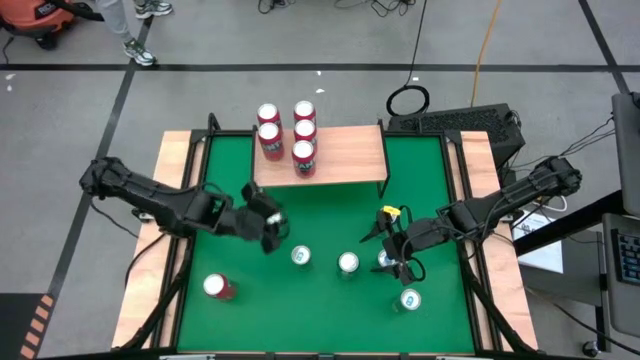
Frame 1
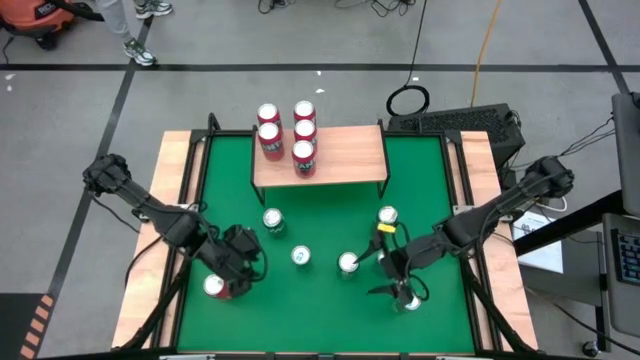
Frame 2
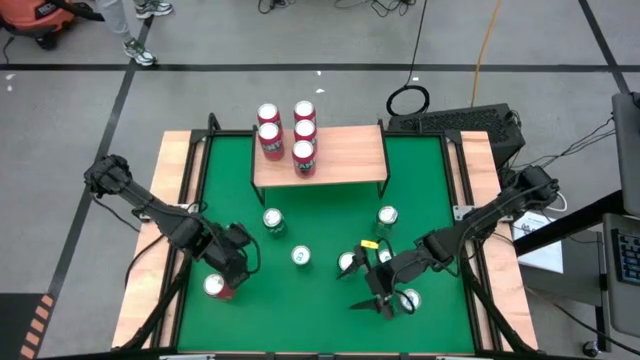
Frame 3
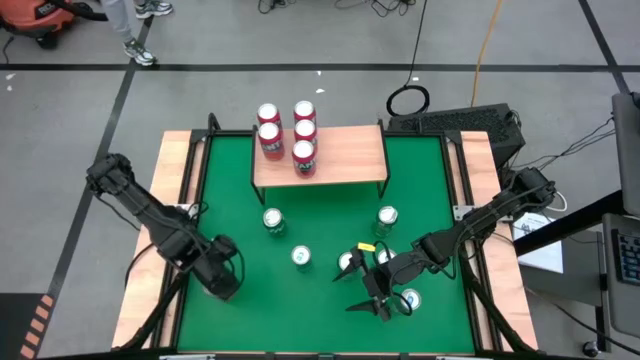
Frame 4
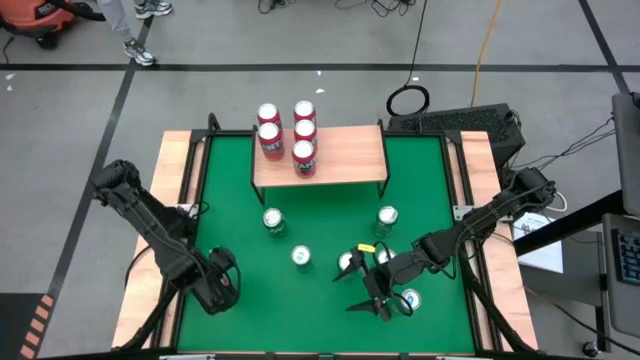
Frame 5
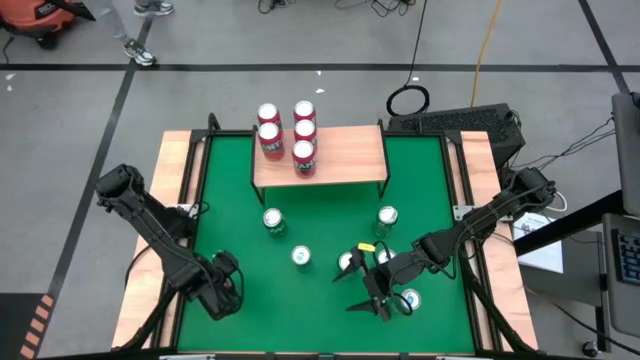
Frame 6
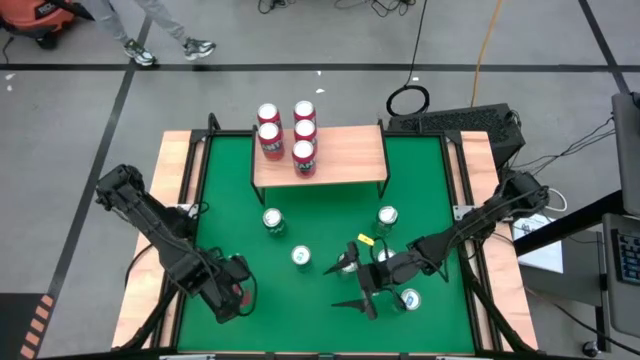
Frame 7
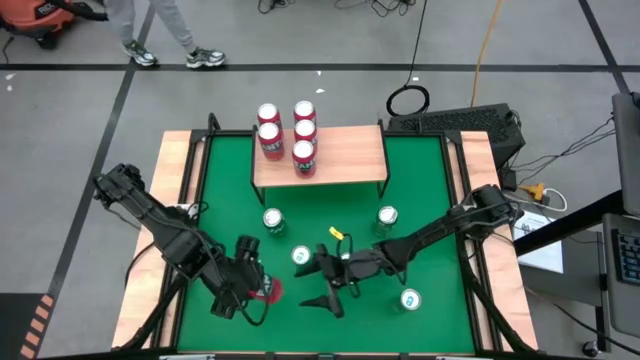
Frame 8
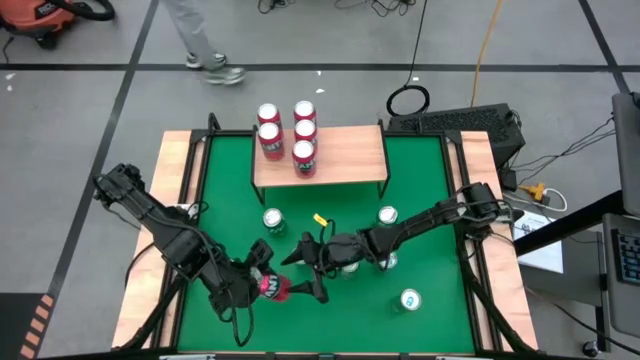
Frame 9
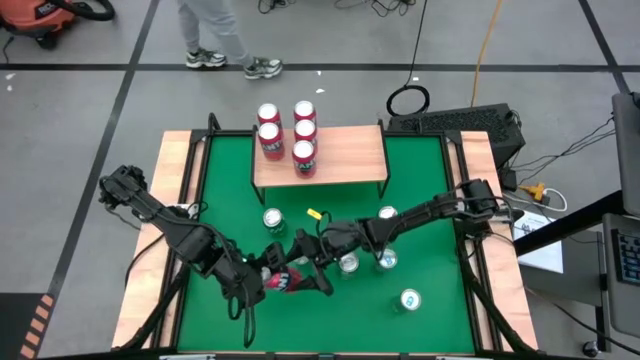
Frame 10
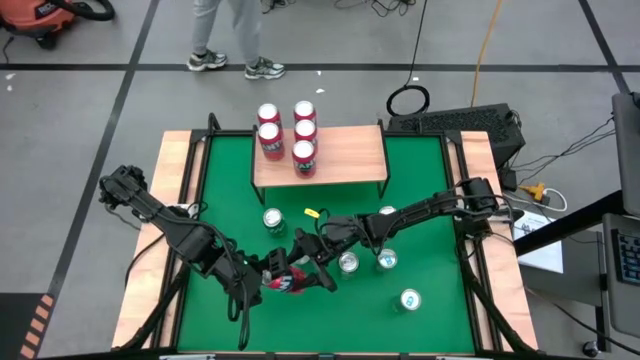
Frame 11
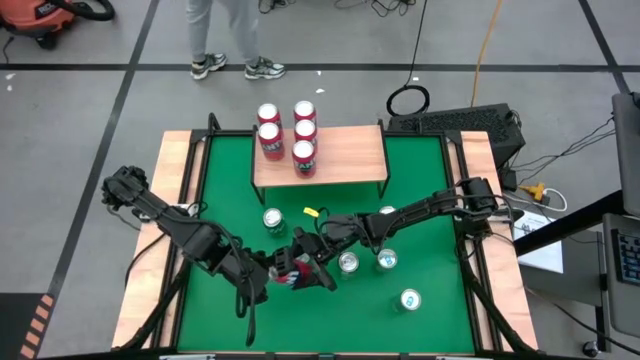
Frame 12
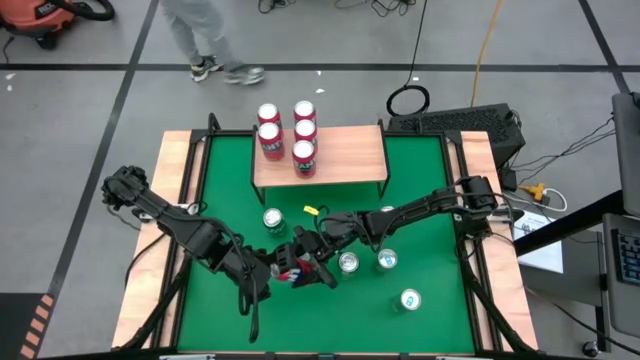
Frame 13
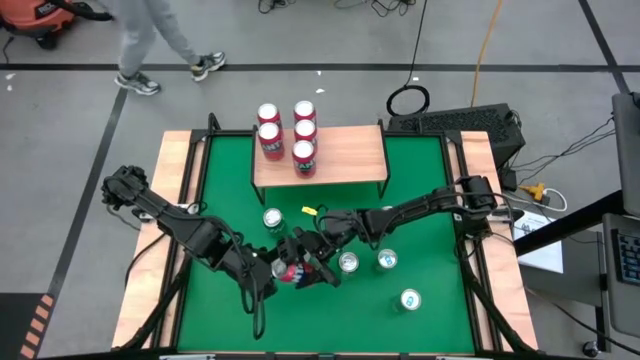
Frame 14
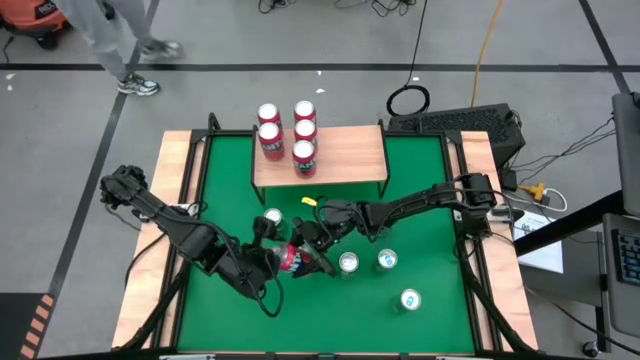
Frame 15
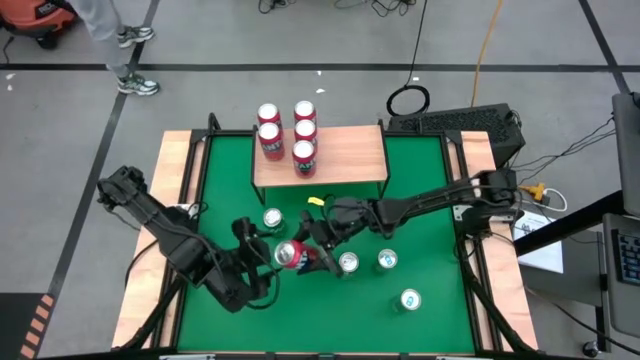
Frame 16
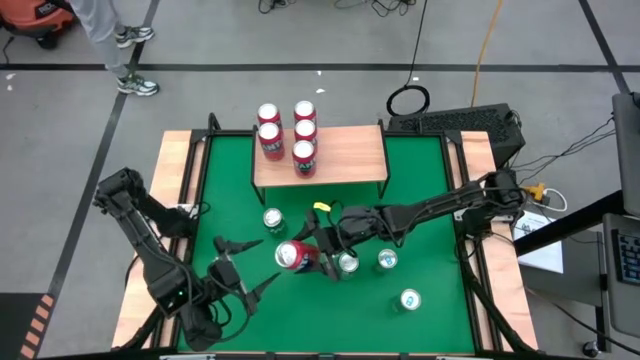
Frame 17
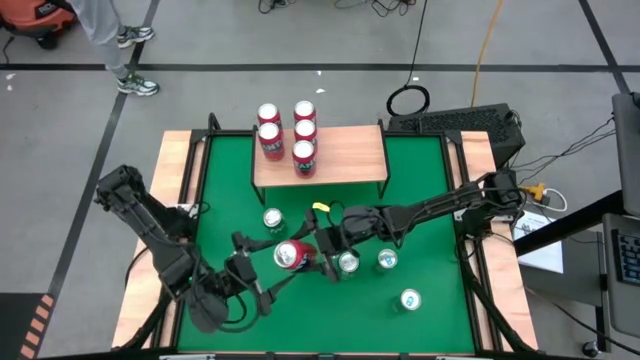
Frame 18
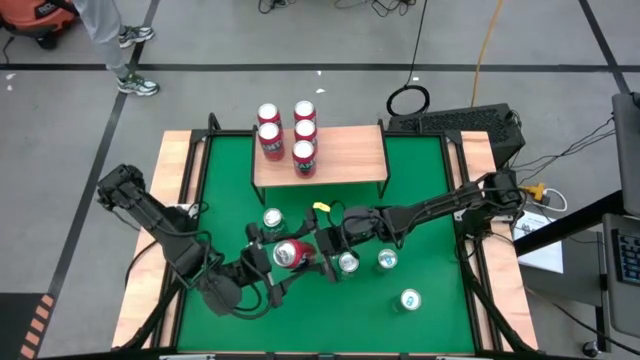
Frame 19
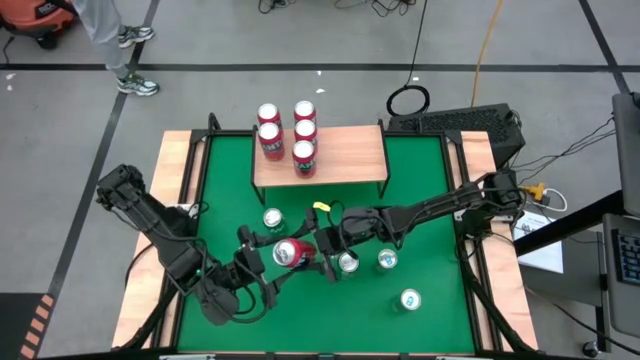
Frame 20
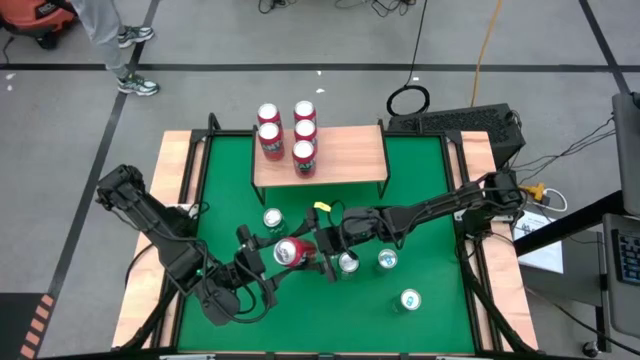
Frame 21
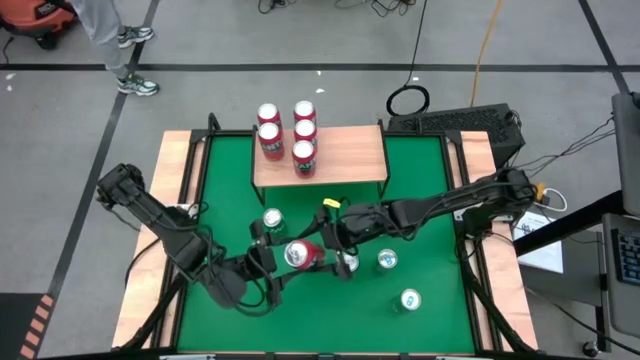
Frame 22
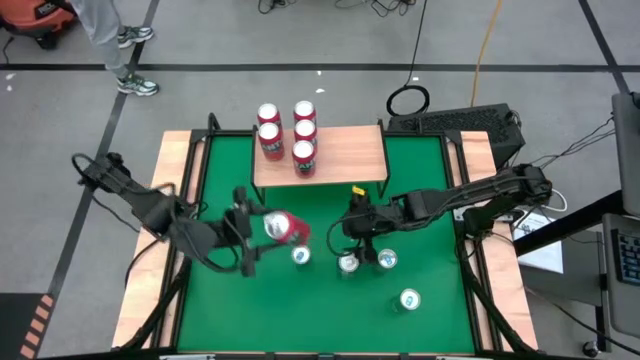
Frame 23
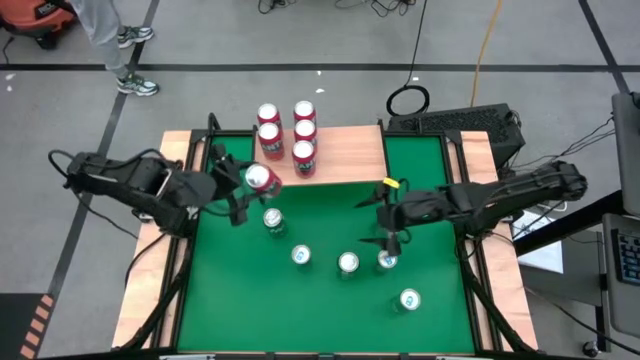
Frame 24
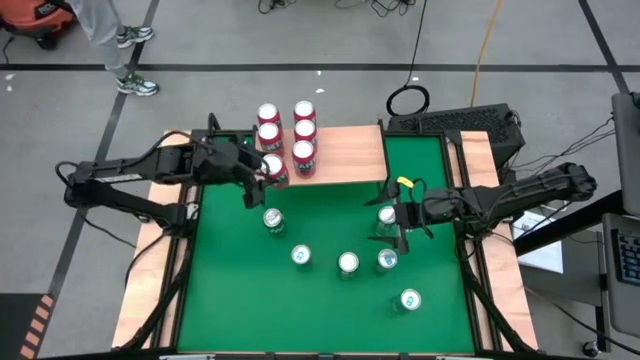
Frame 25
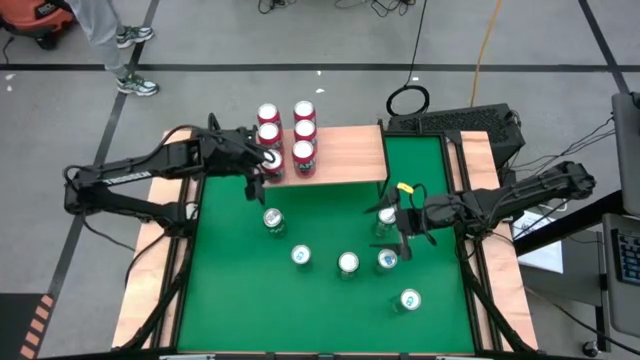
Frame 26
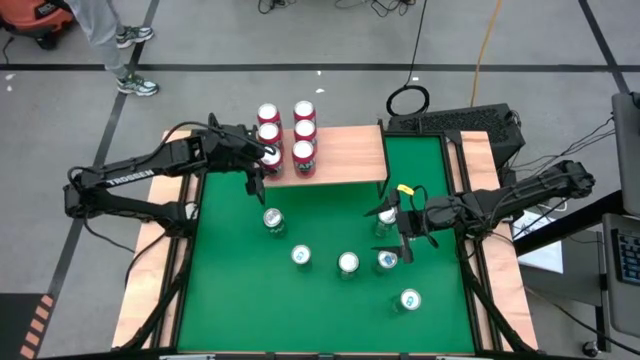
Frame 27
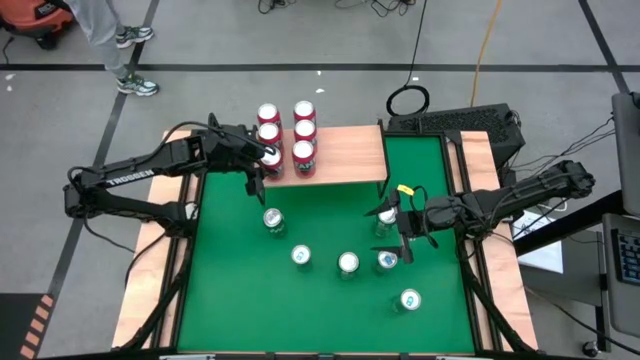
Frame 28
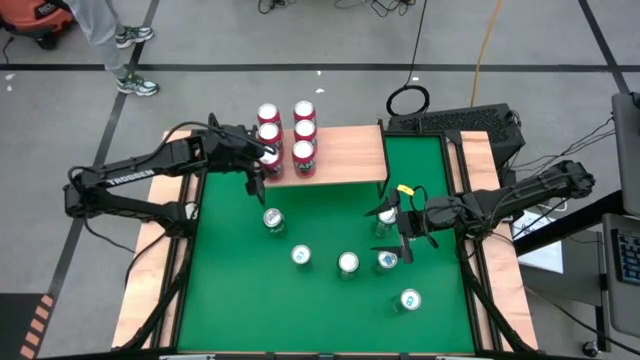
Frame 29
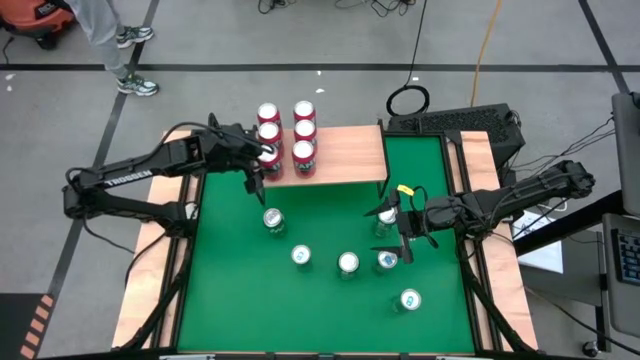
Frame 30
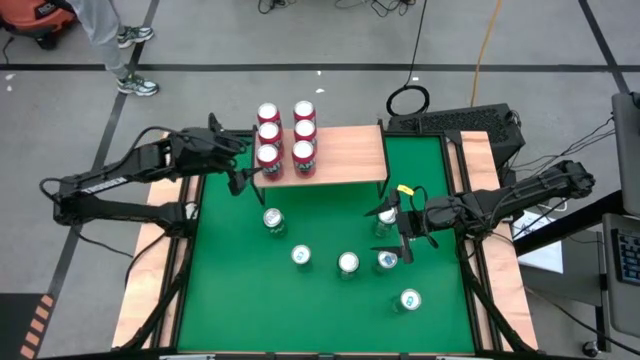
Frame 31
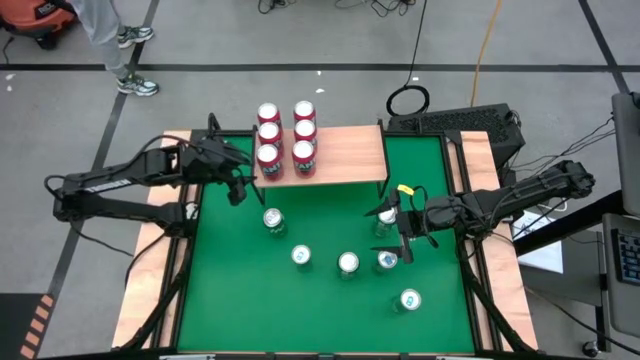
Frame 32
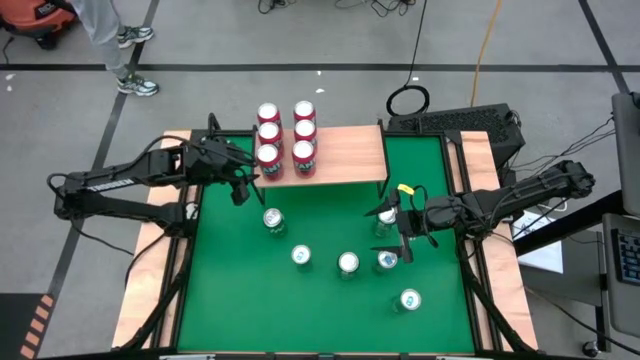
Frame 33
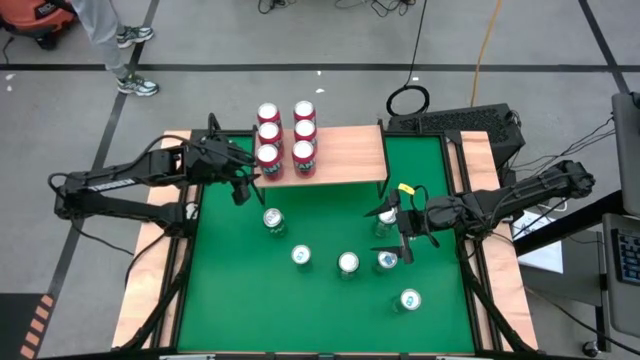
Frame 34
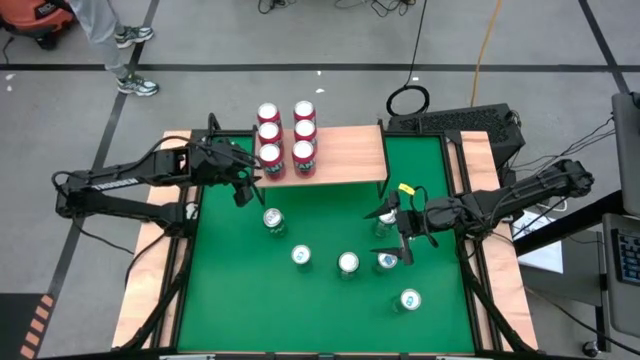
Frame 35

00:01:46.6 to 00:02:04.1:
Task: Place canned beverage on shelf
Put the red soda can on the shelf aligned with the other red soda cans

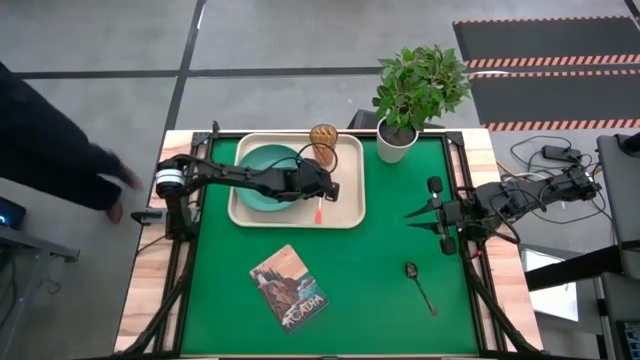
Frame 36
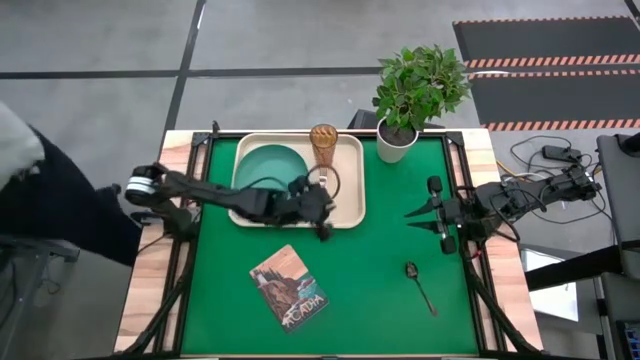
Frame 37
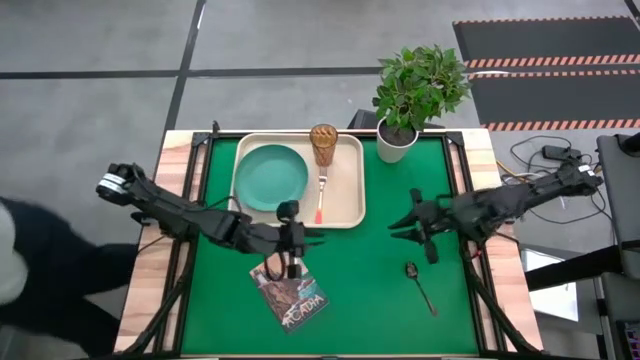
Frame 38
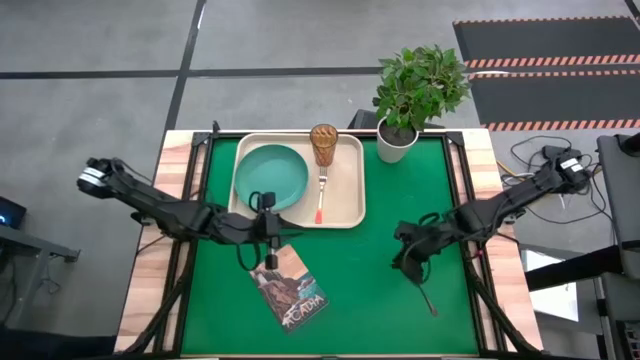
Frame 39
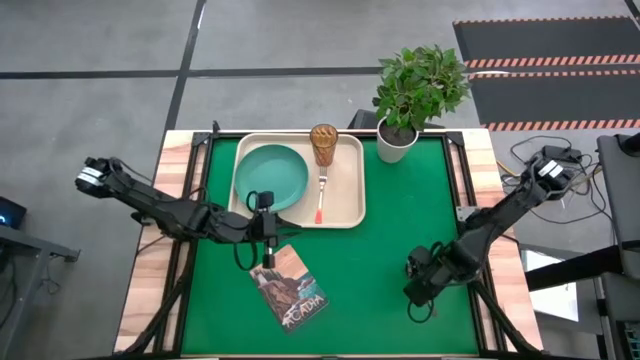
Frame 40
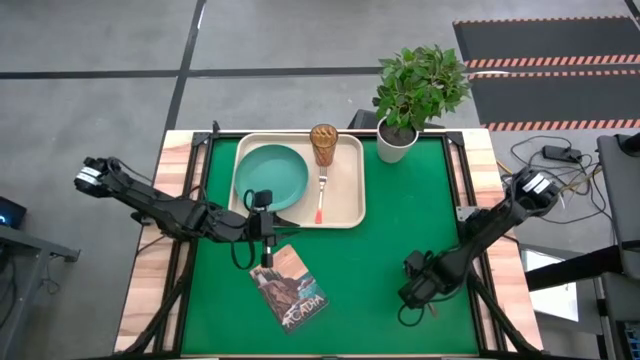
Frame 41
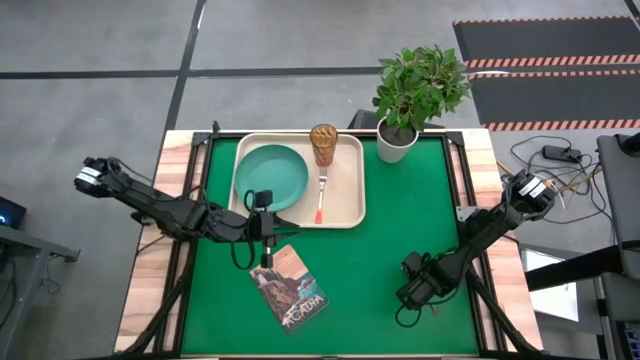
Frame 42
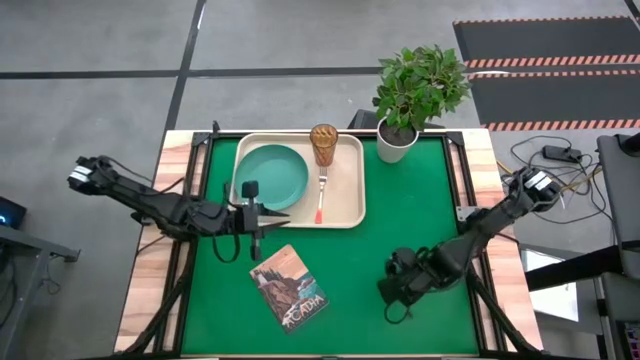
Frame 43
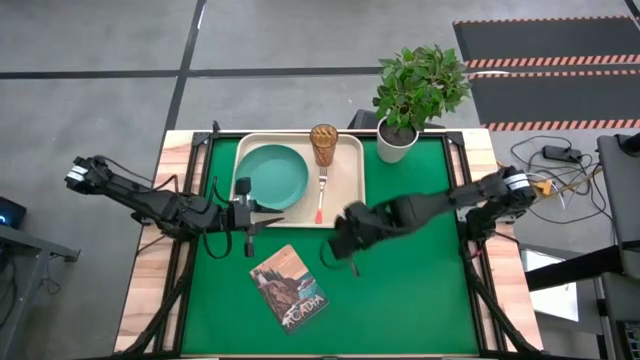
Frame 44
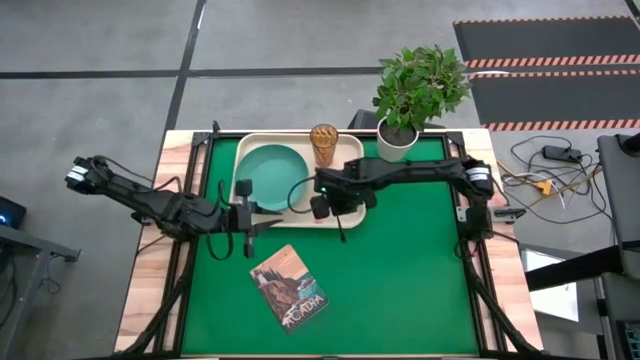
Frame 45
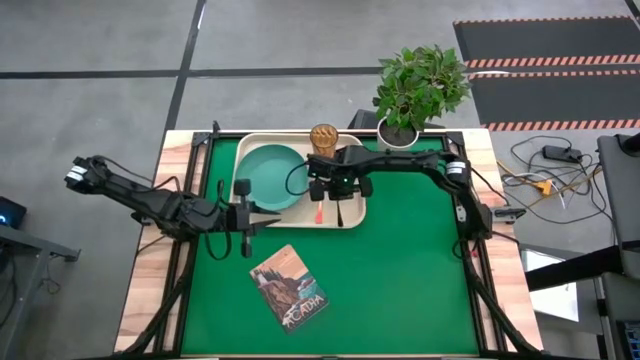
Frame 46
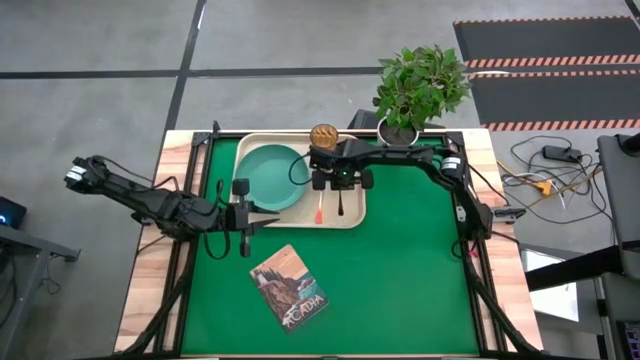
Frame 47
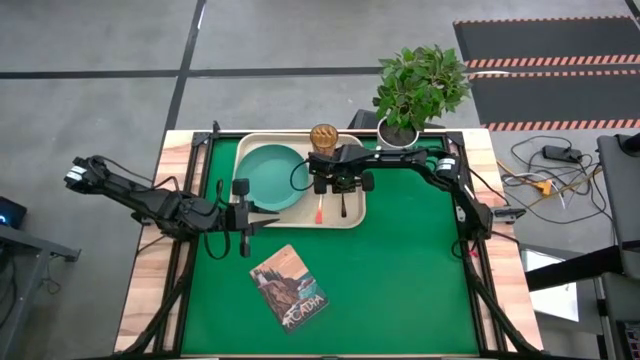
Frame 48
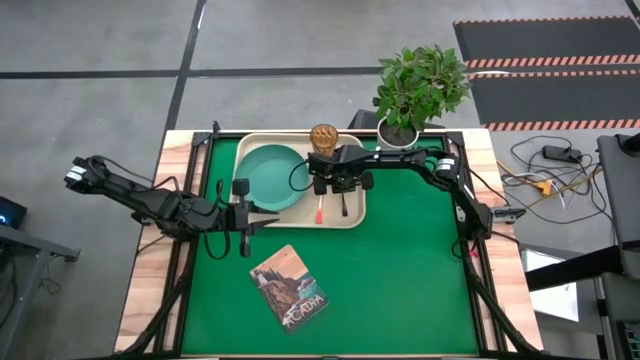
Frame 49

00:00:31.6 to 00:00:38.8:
Task: Pick and place plate/cup/fork/spoon on tray
Put the black spoon on the tray to the right of the orange fork
